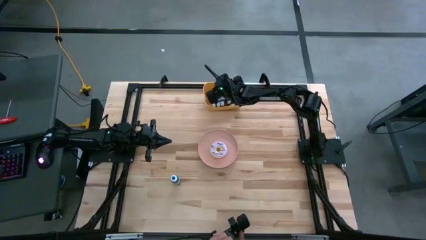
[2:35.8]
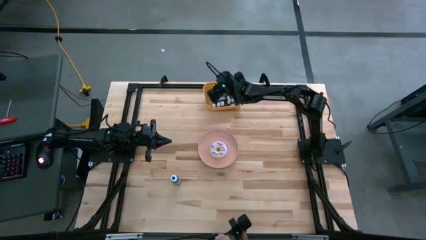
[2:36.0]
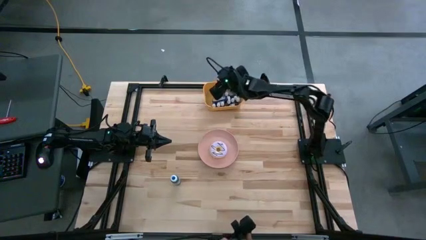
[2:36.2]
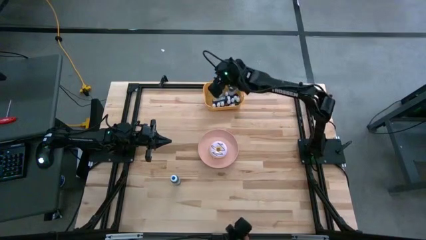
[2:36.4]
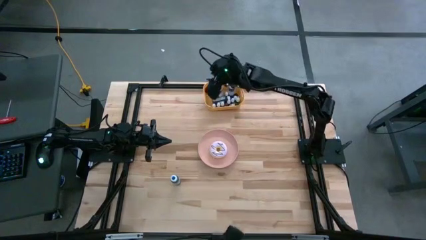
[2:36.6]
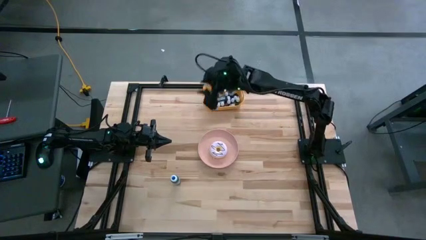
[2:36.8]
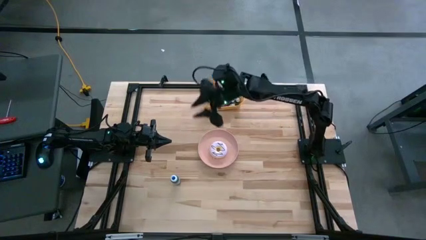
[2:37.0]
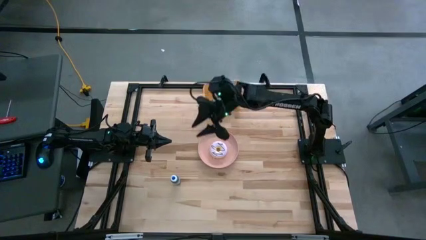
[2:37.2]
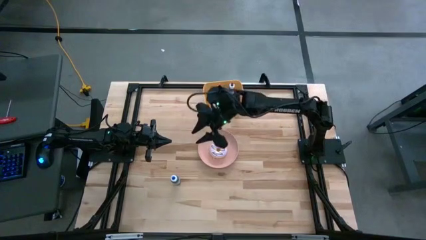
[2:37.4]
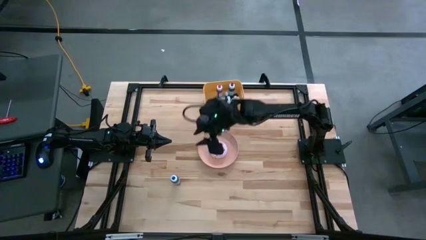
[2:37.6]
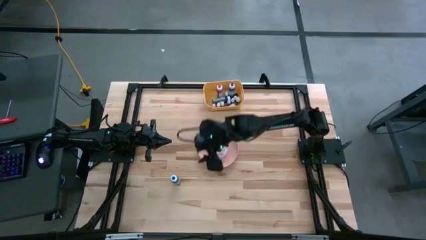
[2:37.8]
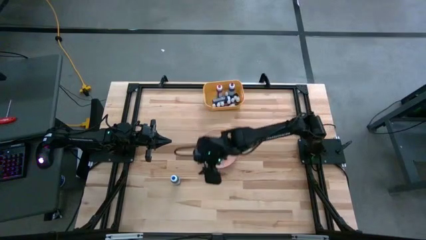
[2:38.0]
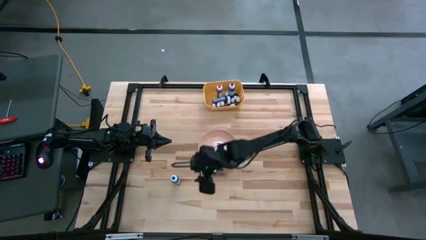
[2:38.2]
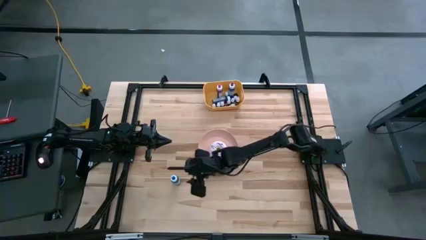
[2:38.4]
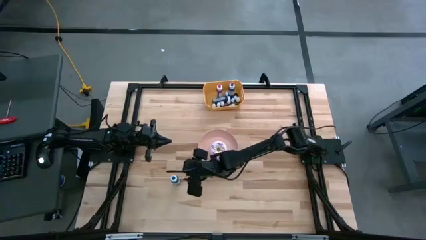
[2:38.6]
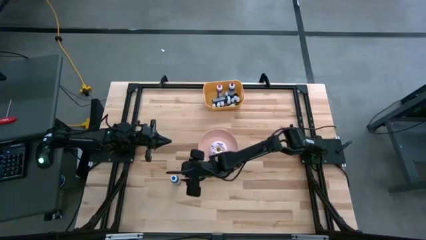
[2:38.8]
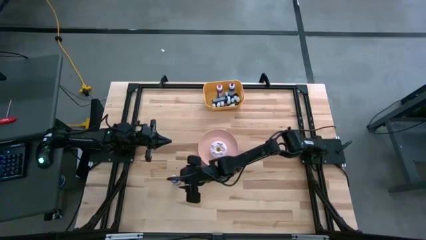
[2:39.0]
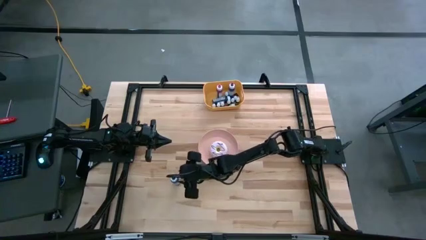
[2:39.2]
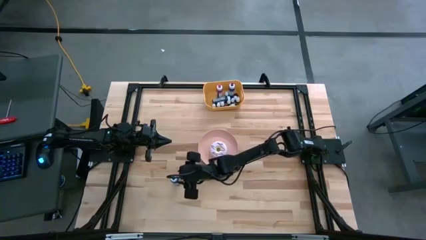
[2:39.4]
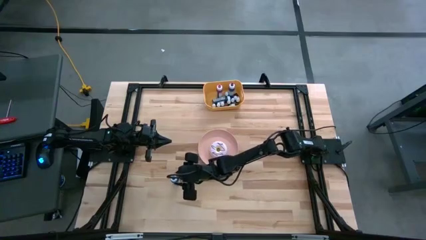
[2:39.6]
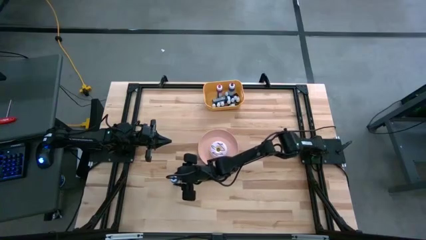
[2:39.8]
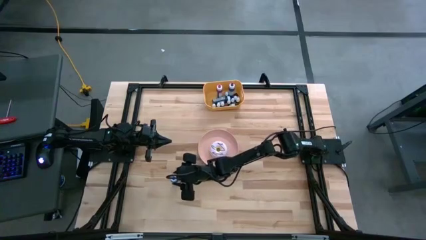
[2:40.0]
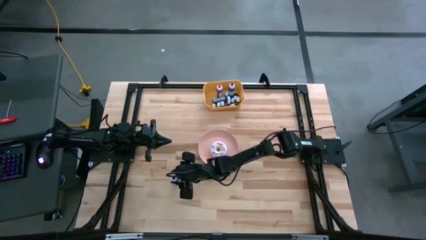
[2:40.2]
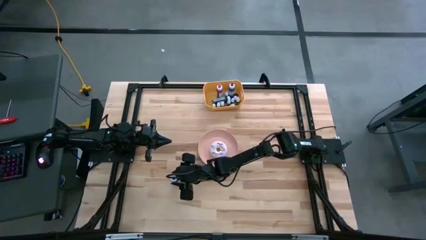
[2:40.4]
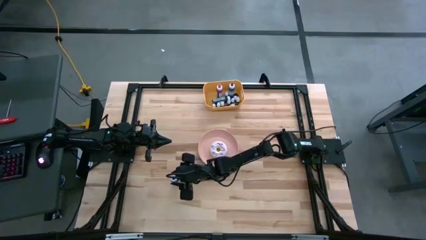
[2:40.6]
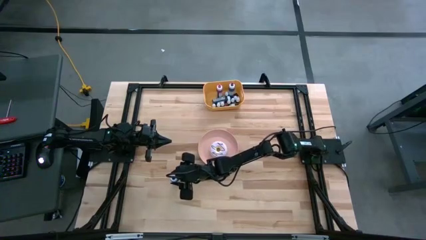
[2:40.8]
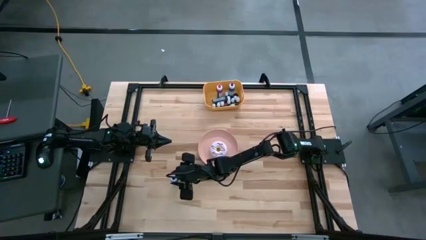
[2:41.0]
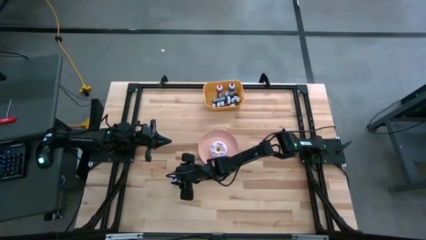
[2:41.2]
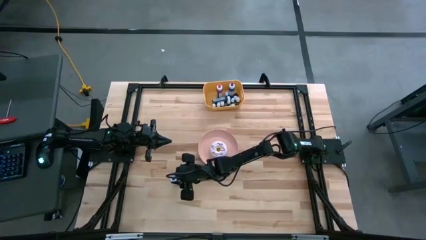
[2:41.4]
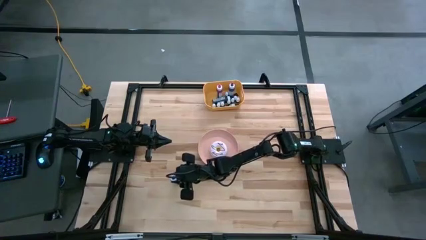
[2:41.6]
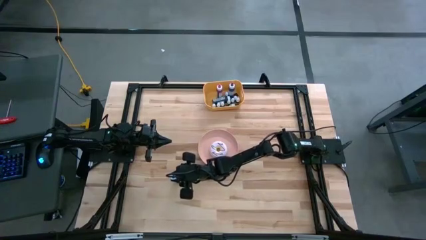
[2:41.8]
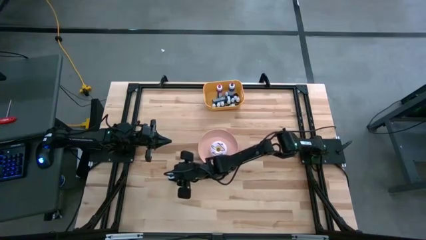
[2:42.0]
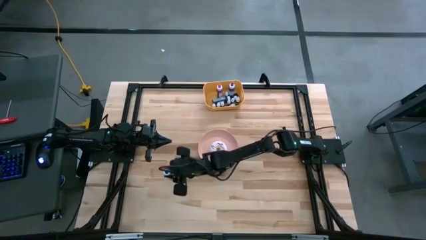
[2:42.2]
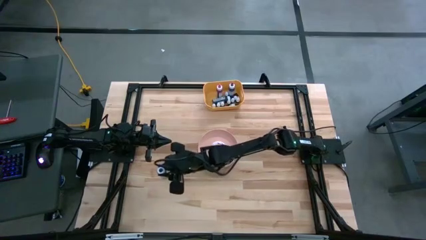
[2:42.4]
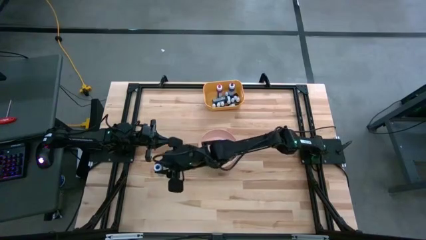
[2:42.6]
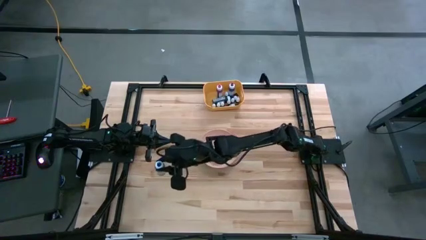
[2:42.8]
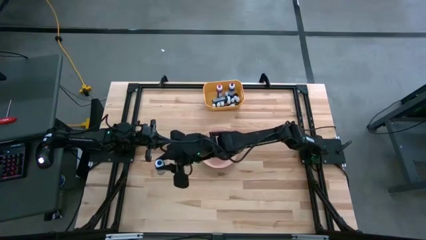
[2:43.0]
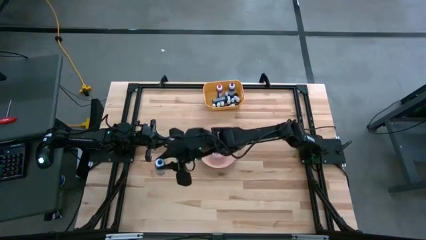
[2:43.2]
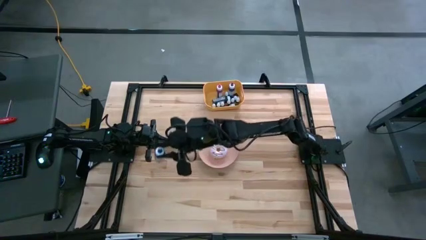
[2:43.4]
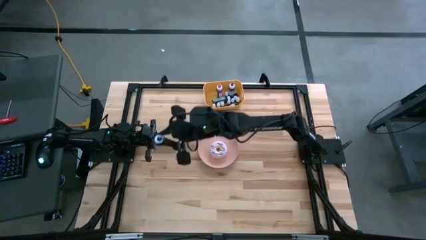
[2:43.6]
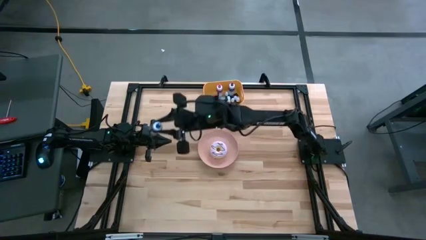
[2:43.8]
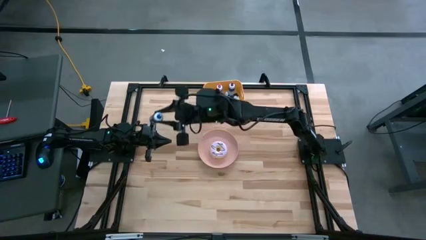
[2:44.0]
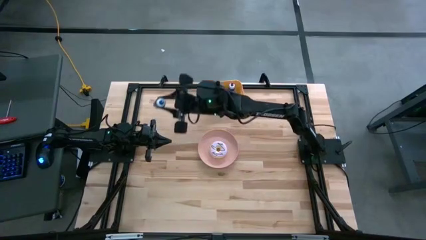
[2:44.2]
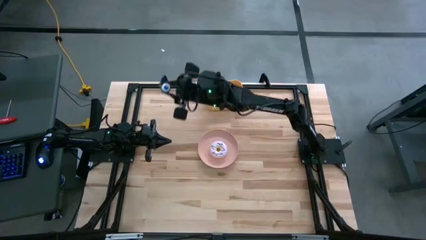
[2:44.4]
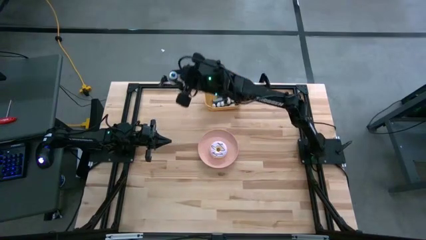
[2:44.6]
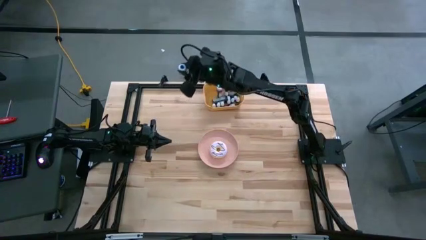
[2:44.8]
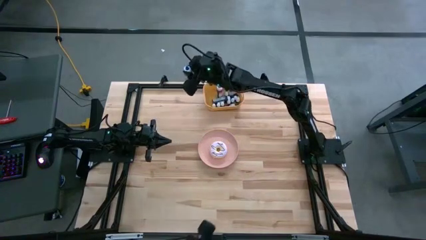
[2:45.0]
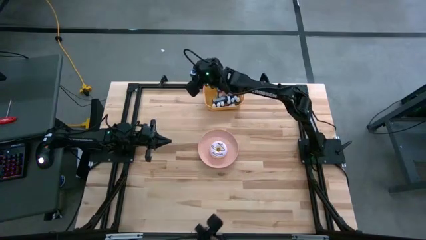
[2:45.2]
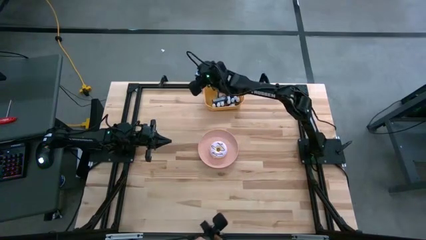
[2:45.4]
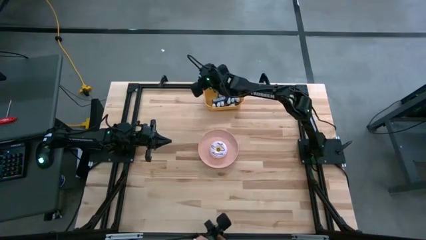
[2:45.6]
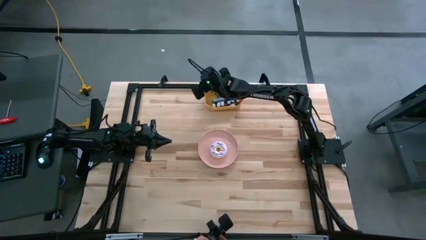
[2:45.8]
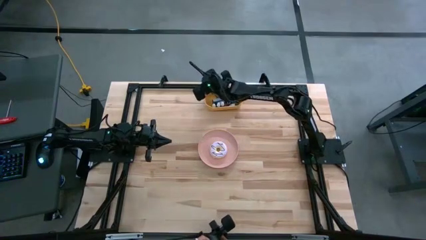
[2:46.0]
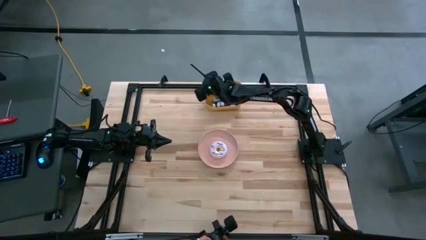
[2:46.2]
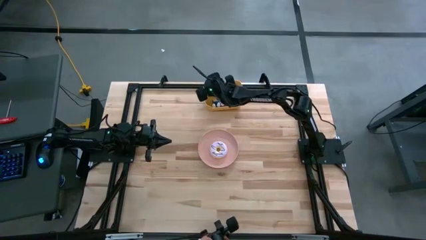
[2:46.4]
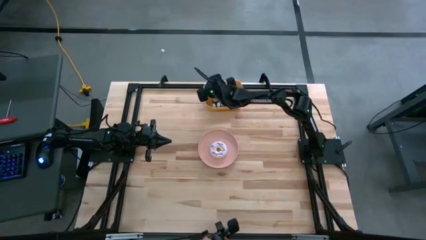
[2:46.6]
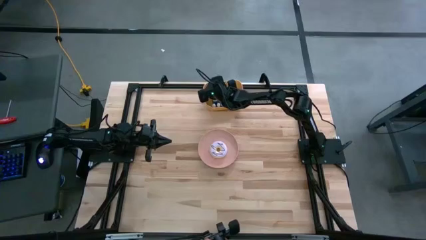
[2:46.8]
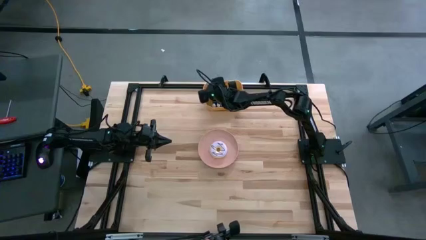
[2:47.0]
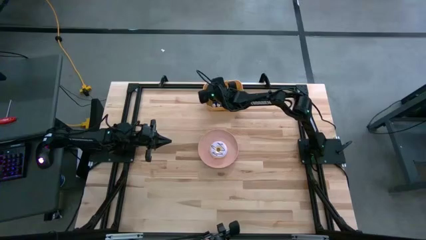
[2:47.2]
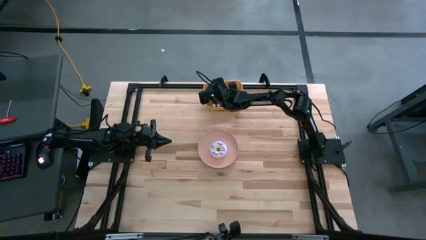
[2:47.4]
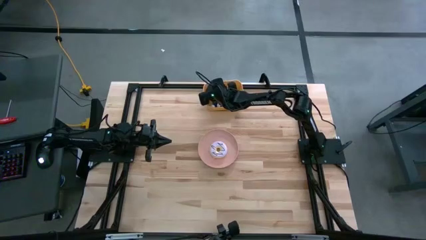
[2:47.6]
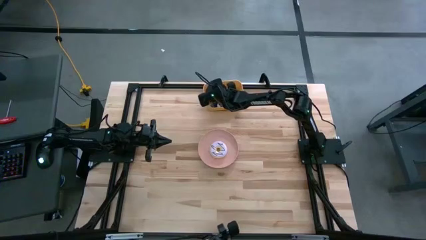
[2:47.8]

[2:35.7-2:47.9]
Task: Pick & Place food coloring
Put the large blue food coloring bottle into the orange bin

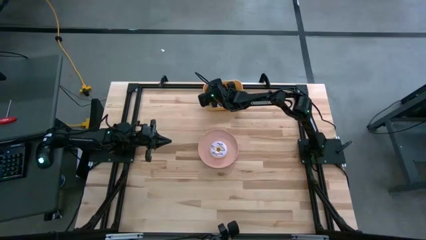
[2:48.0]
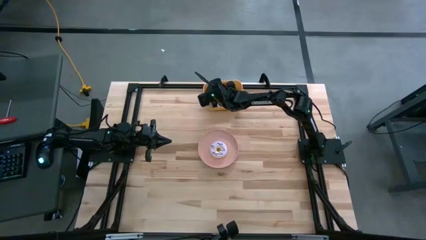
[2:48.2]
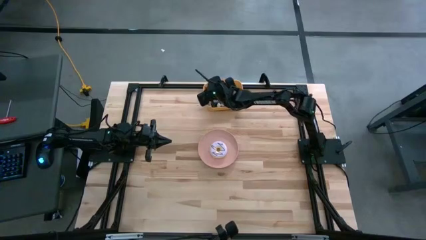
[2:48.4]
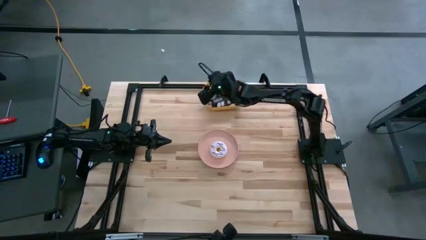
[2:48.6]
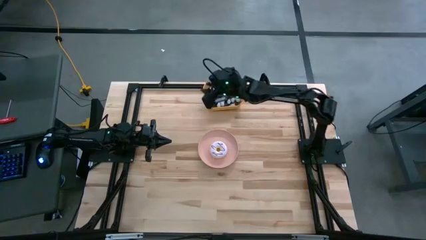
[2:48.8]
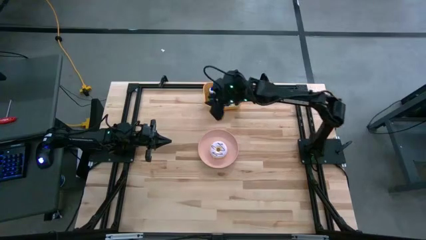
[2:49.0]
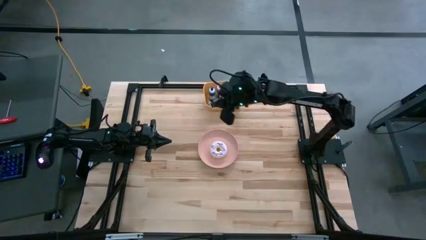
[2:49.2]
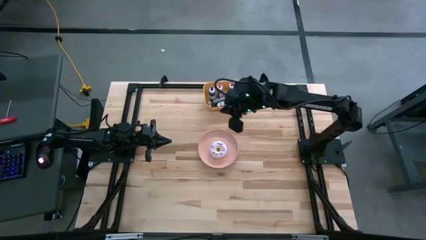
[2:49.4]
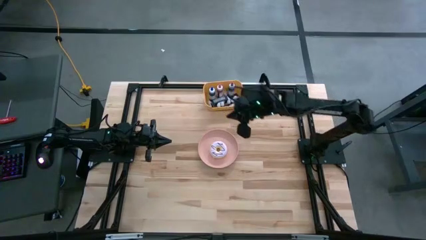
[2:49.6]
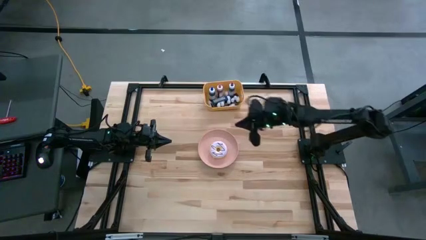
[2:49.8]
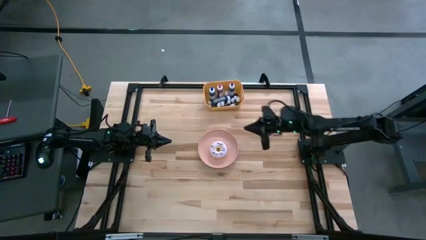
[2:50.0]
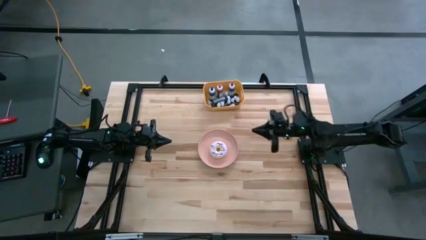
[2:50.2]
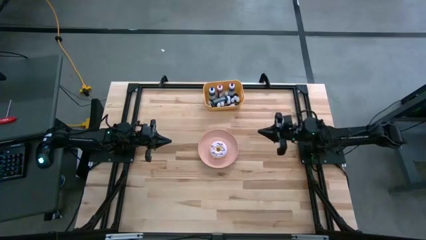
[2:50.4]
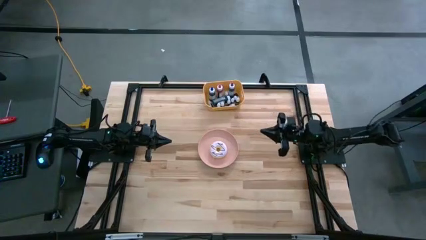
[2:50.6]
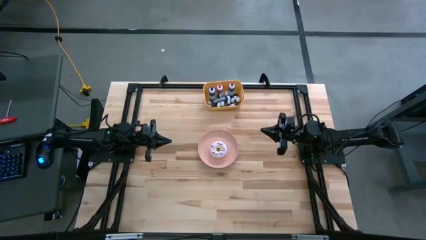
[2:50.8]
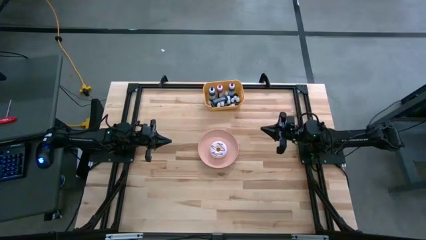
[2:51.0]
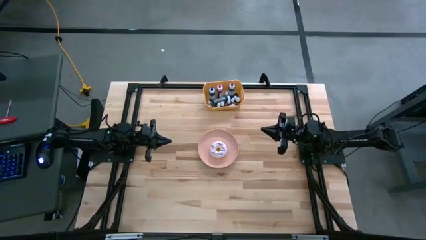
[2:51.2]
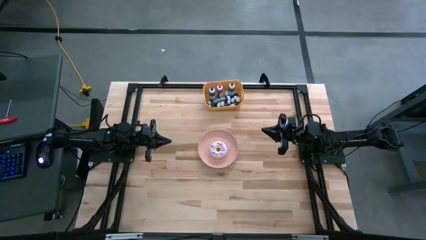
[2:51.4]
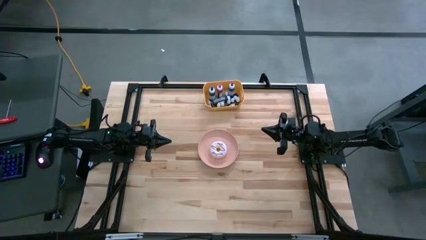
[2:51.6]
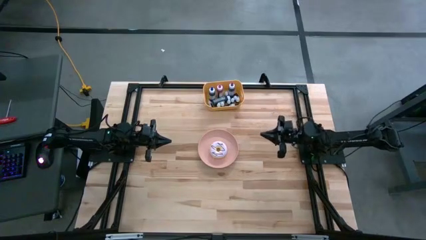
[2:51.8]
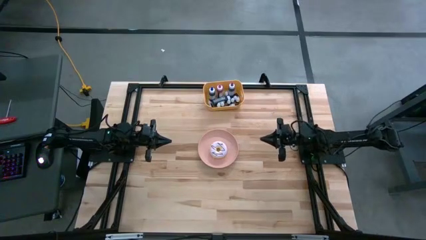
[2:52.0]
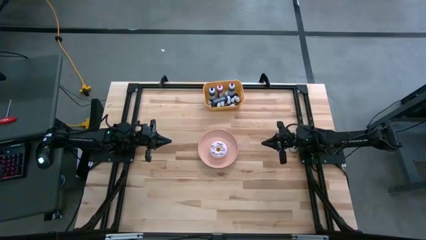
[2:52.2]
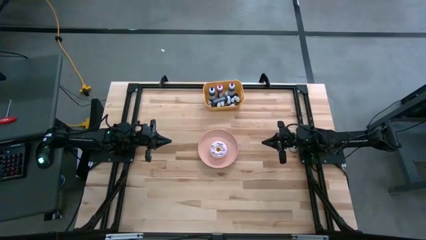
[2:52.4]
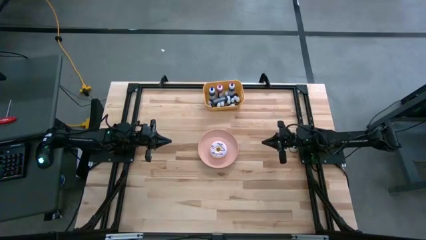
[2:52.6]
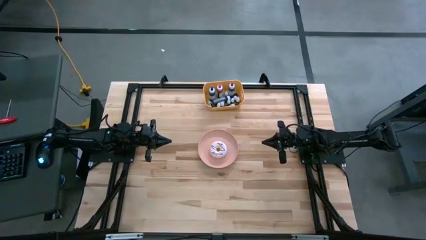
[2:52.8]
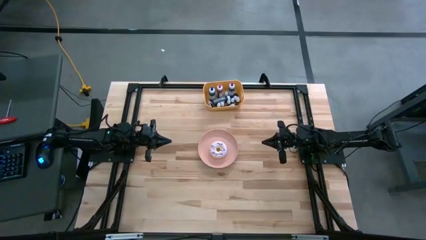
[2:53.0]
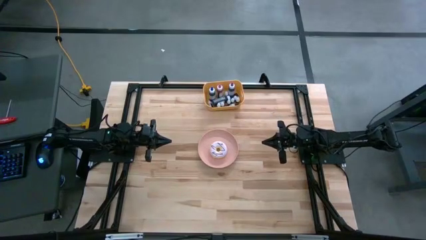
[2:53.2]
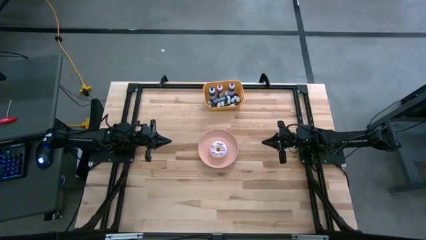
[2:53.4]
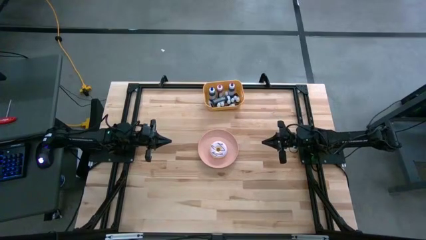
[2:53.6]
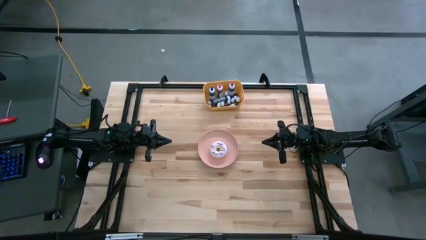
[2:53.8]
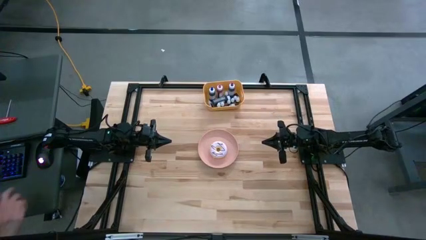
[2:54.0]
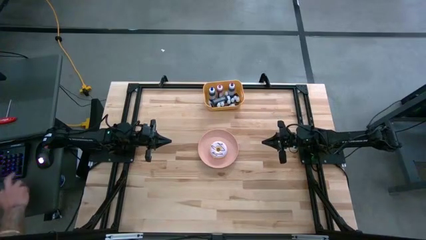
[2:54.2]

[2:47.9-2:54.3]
Return to Home Position
